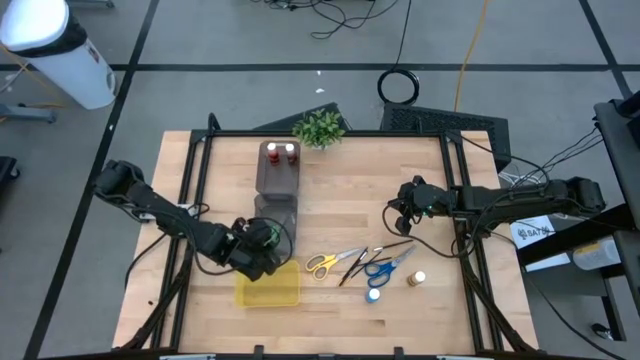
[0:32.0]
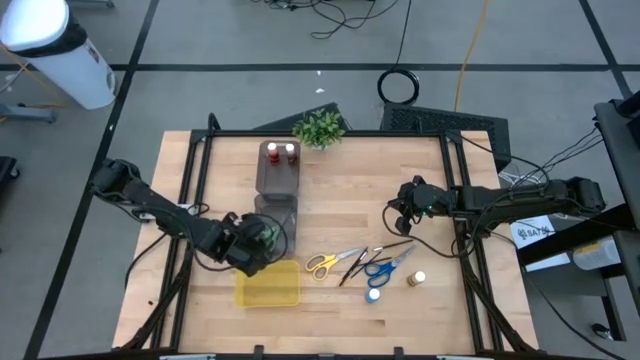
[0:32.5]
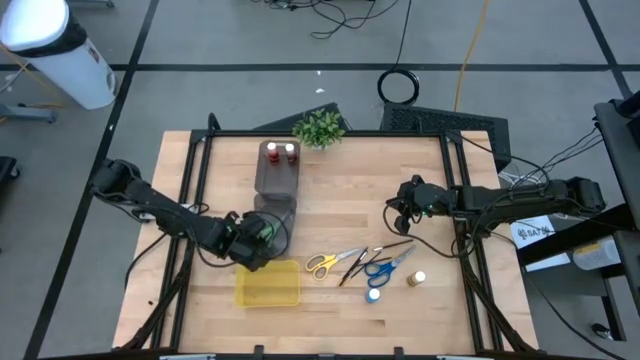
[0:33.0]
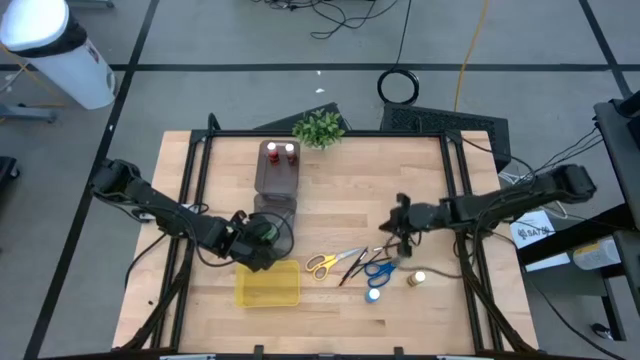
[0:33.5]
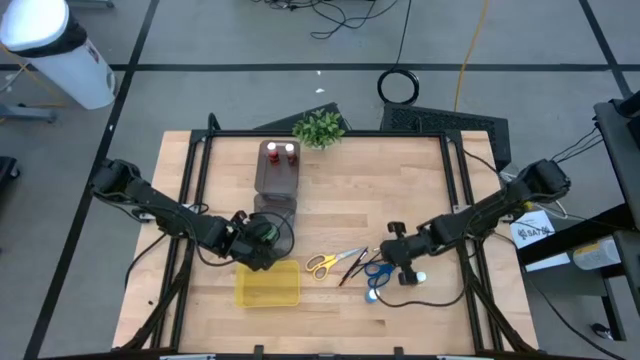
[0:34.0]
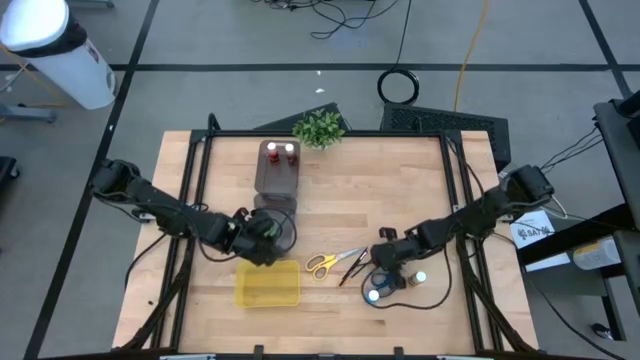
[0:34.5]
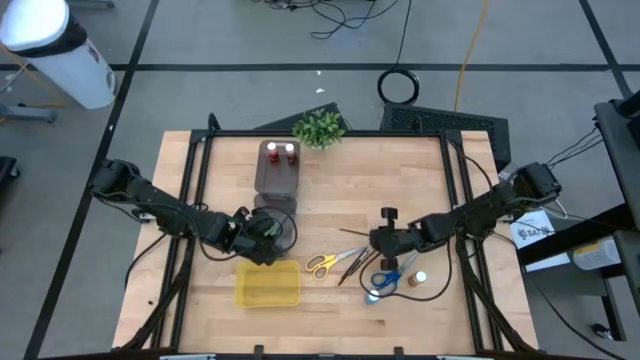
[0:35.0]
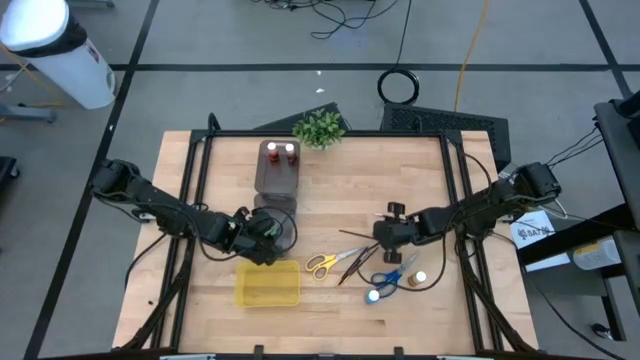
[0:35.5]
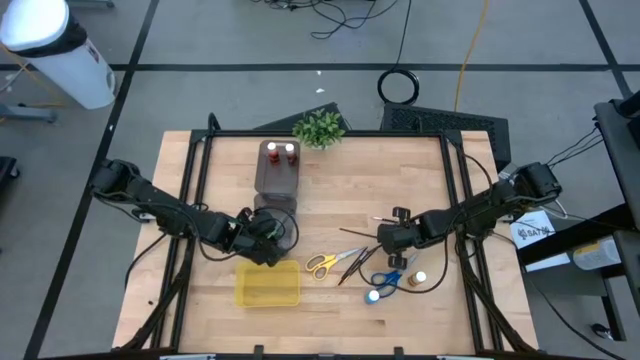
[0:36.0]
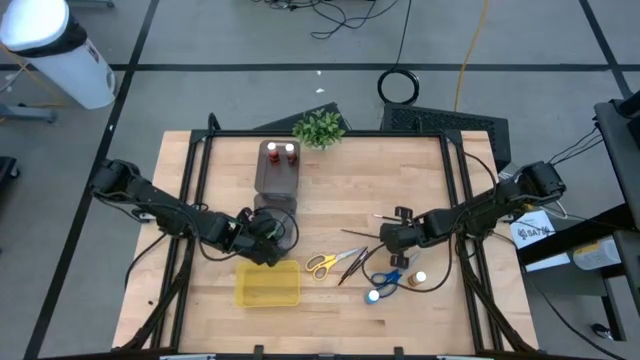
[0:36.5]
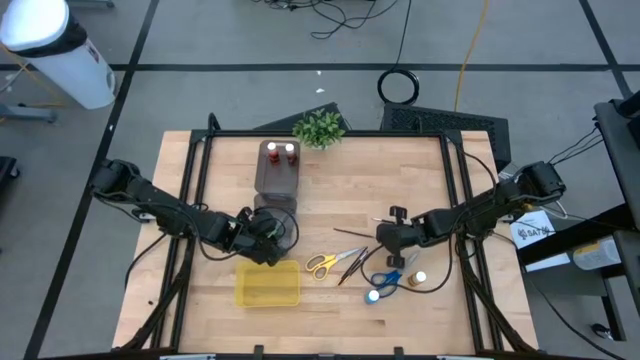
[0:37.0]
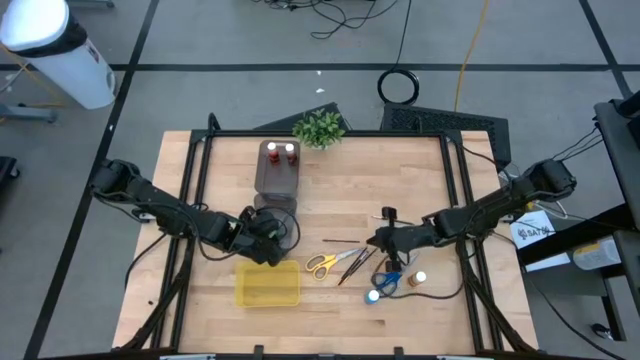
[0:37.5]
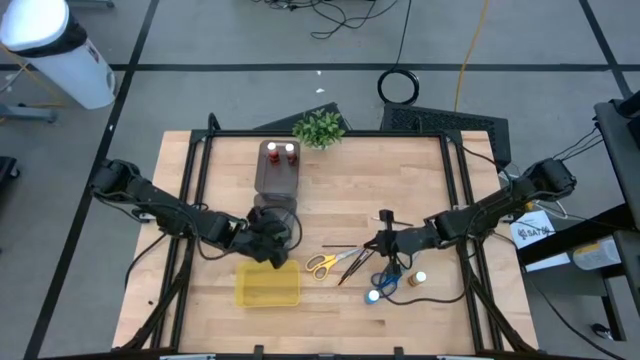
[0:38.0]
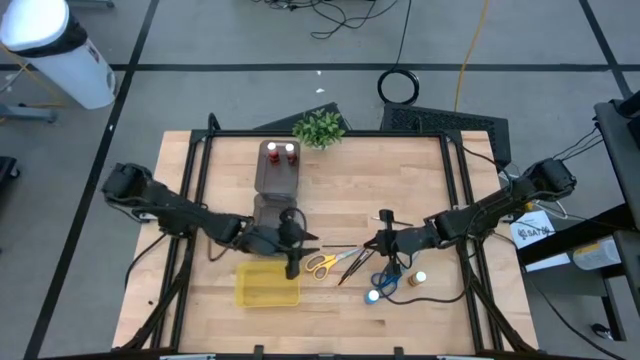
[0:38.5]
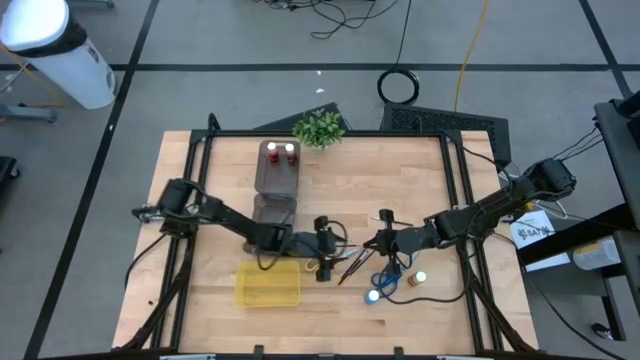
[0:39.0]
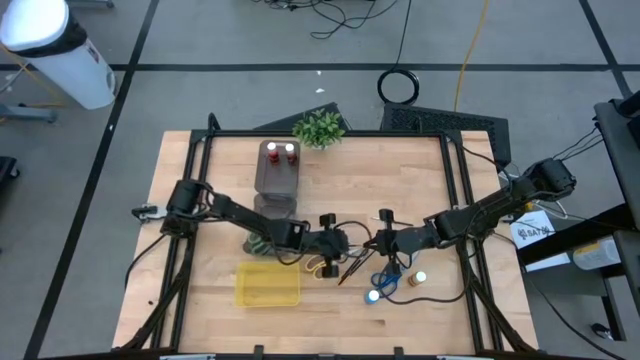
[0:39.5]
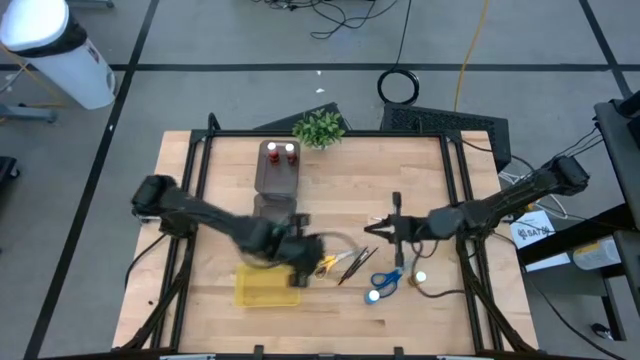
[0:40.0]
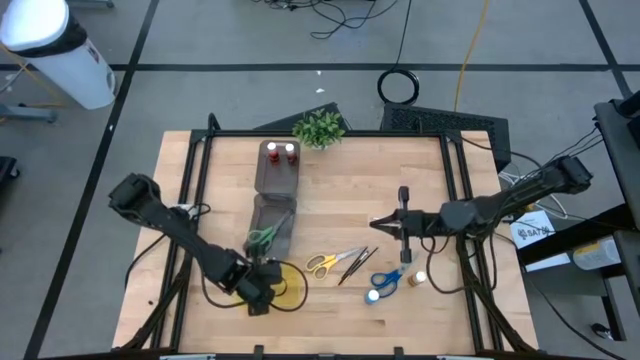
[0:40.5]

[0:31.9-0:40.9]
Task: Pick & Place Paint Supplies
Put the gold paint brush into the yellow bin

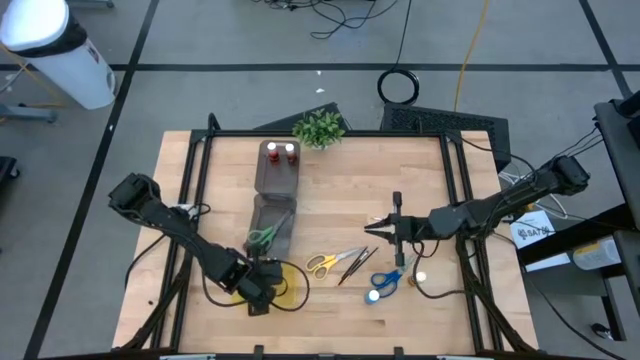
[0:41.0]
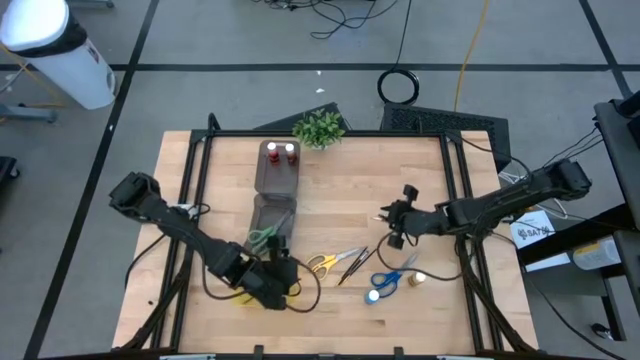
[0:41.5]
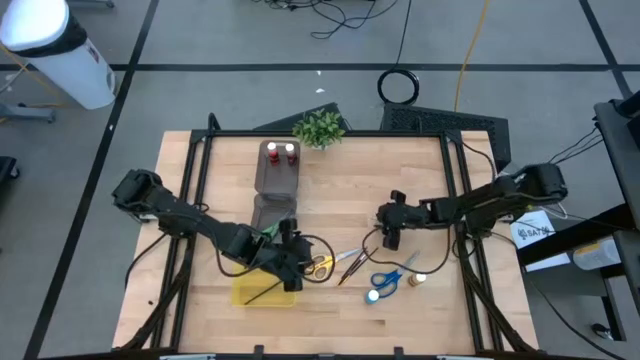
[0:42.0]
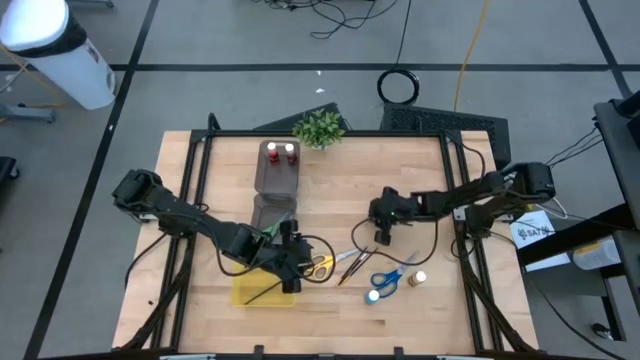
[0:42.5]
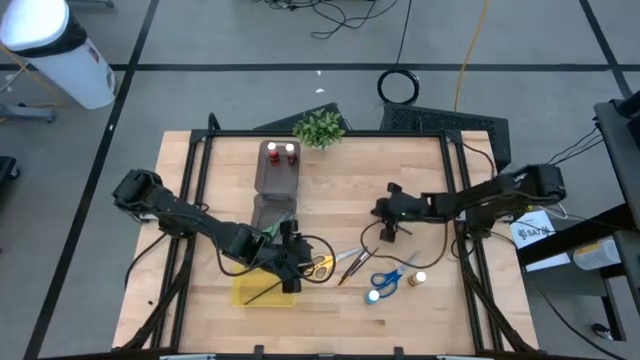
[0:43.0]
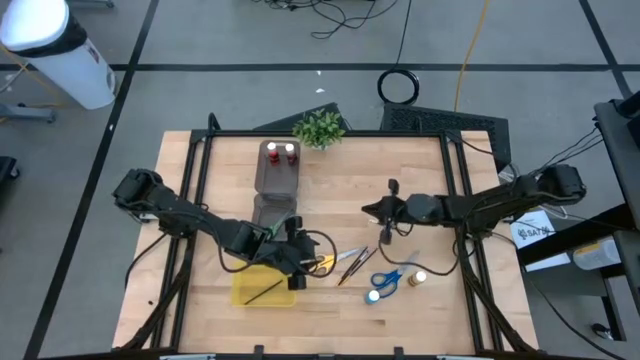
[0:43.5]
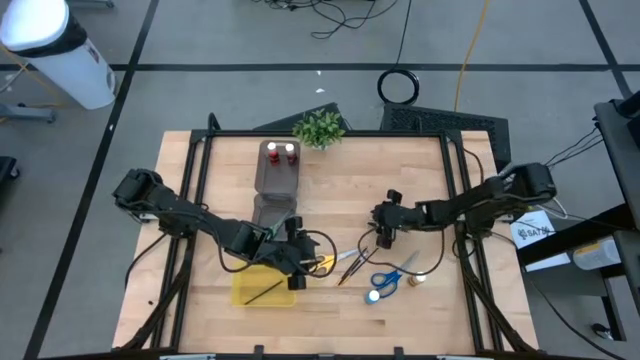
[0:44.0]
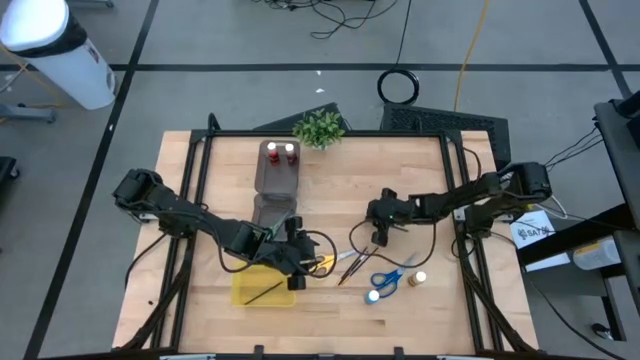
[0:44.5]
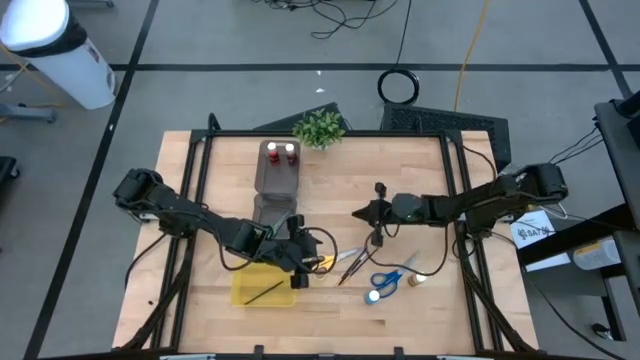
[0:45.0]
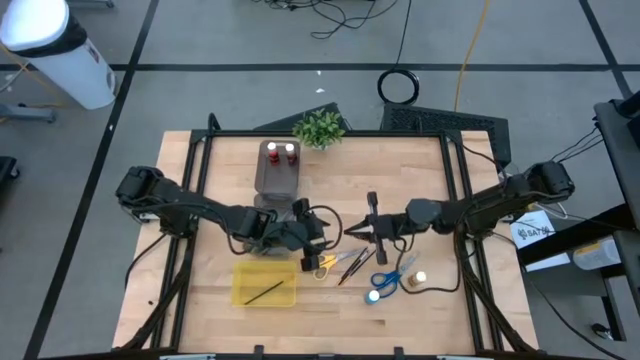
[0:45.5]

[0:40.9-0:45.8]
Put the black liner paint brush into the yellow bin

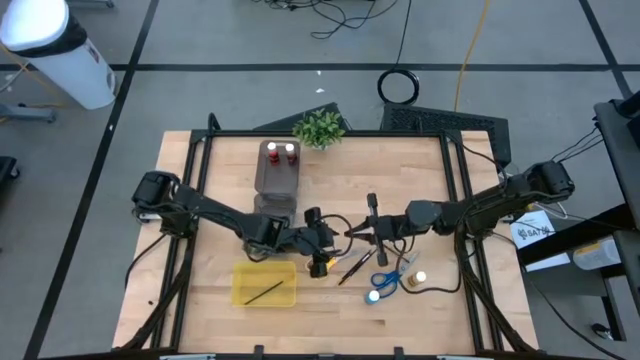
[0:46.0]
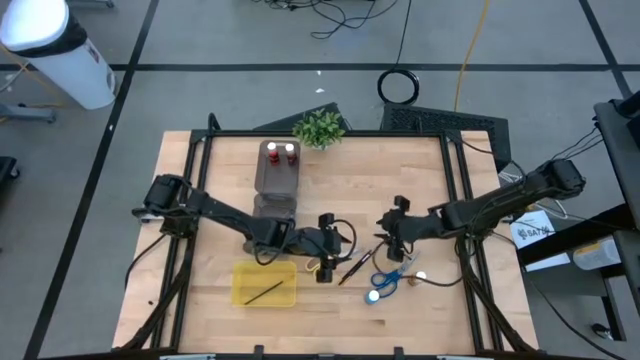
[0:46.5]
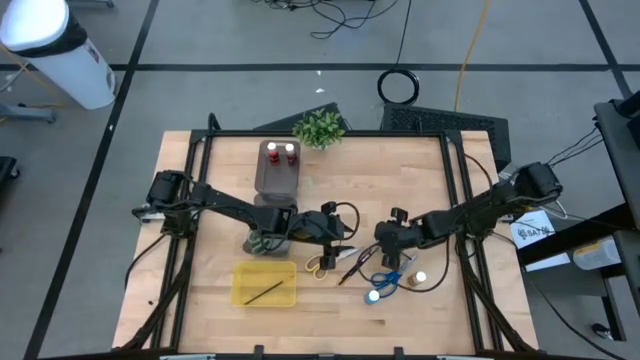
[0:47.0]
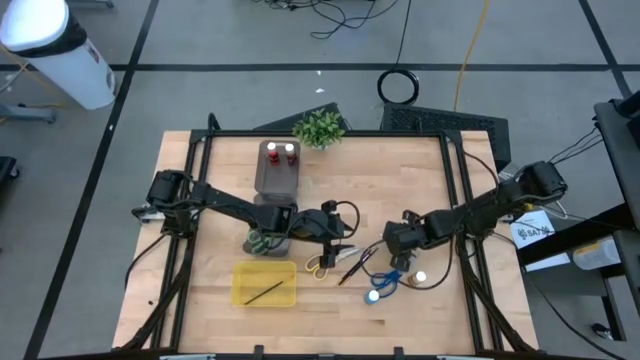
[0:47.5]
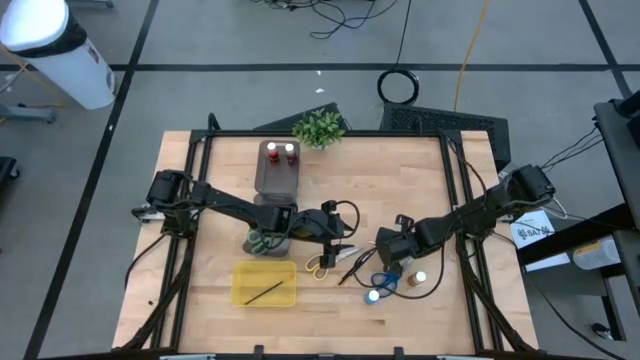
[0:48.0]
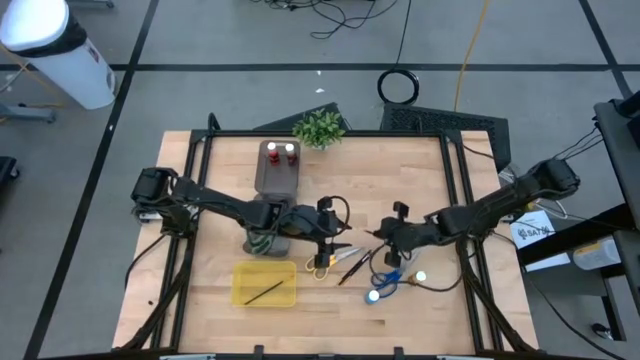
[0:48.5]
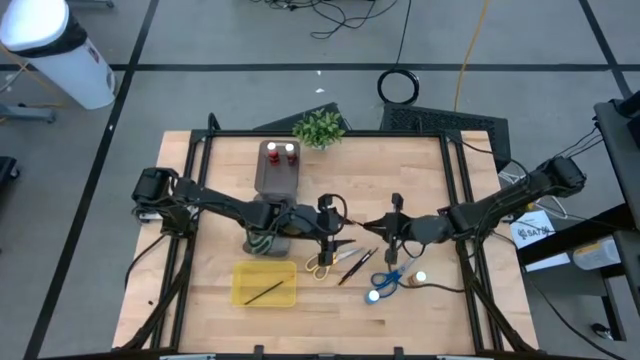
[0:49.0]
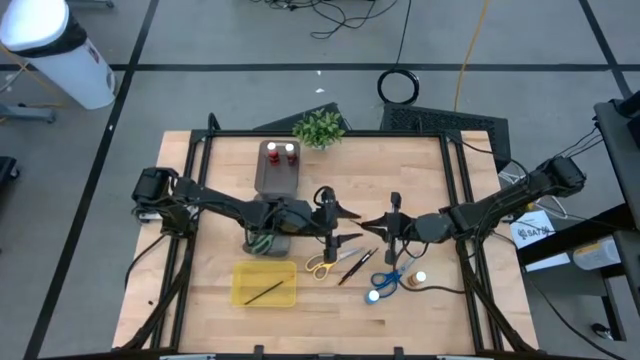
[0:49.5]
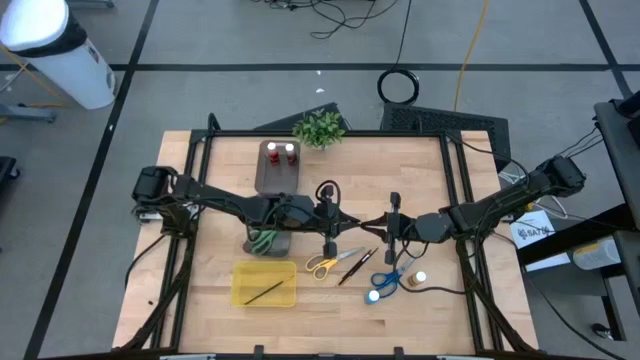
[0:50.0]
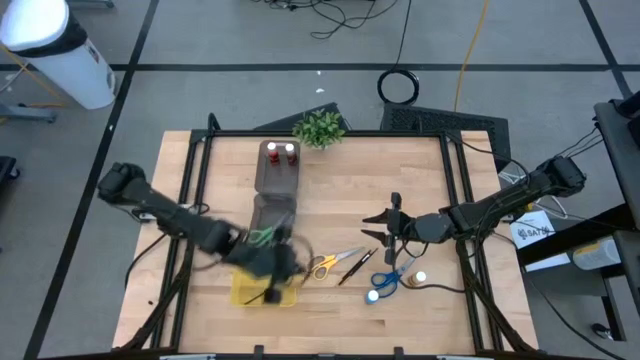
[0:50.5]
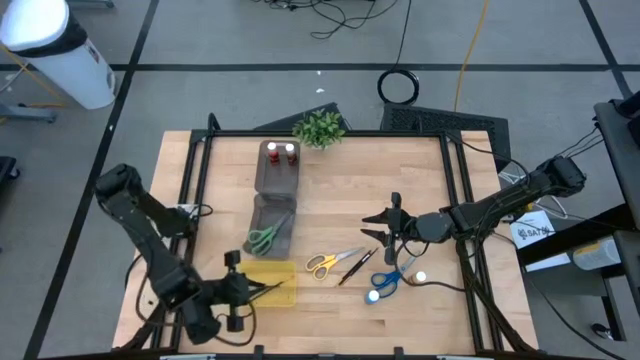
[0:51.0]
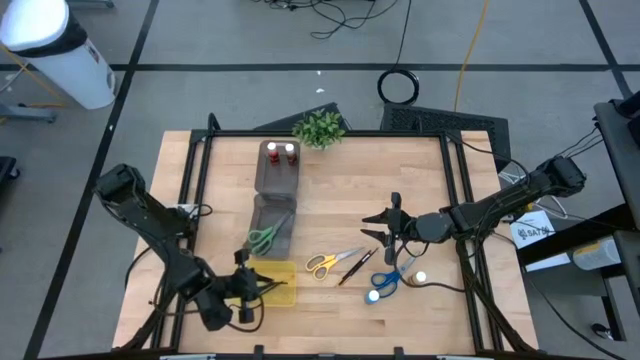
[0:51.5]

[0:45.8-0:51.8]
Put the black liner paint brush into the yellow bin

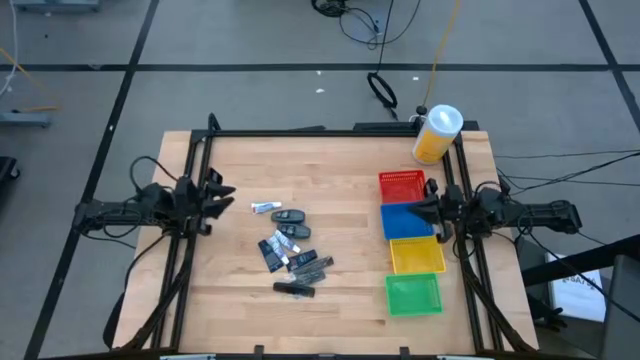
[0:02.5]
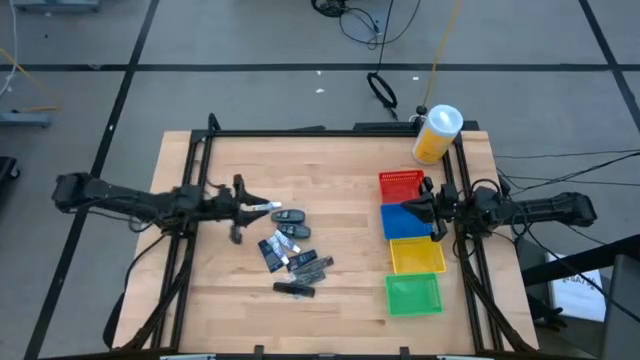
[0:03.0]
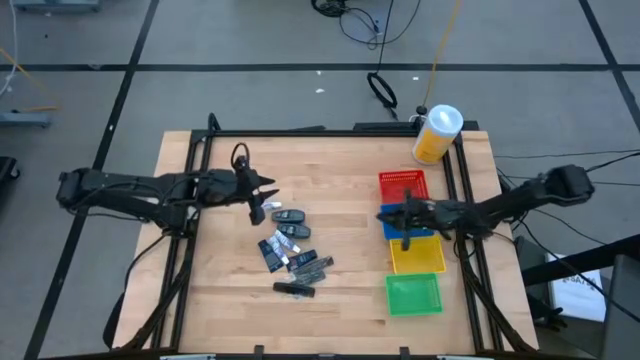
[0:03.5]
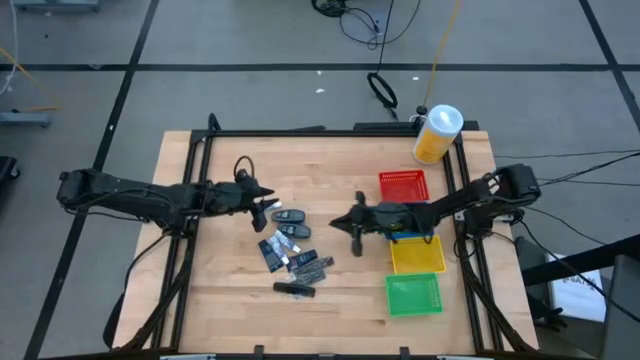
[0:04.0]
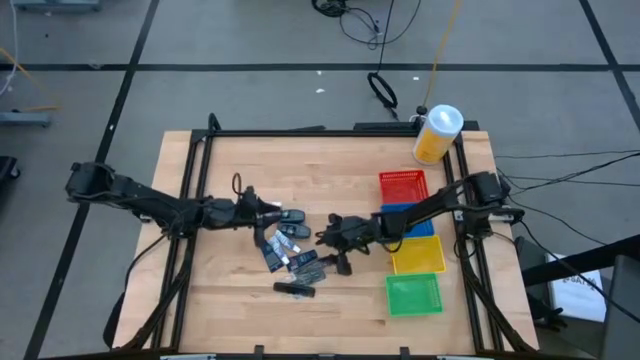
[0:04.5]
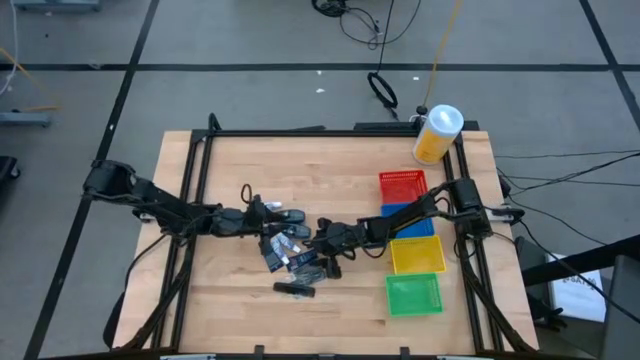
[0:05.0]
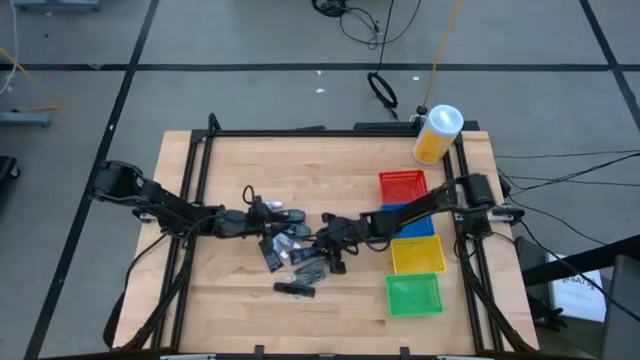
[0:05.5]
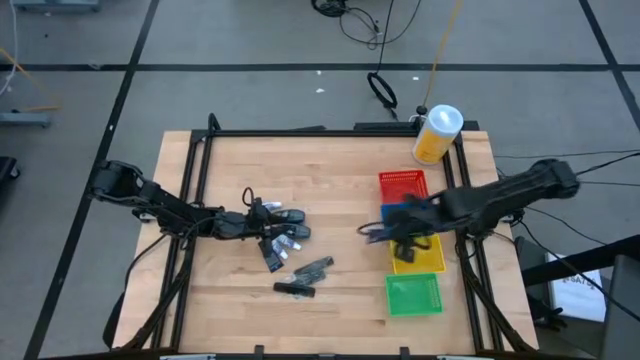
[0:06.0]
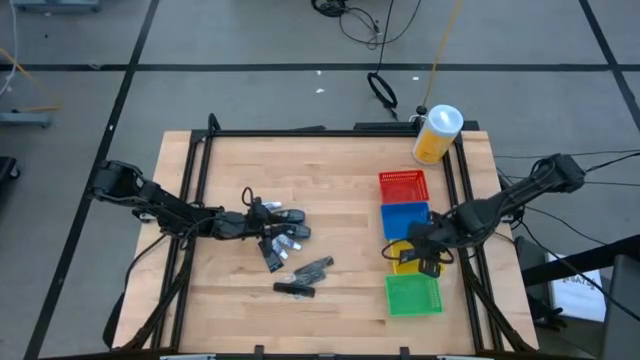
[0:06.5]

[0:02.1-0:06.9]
Task: Pick & Place Travel size toiletries
Put the black shaving cream into the yellow bin
